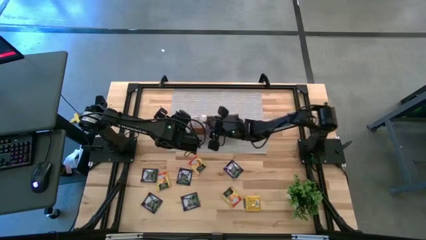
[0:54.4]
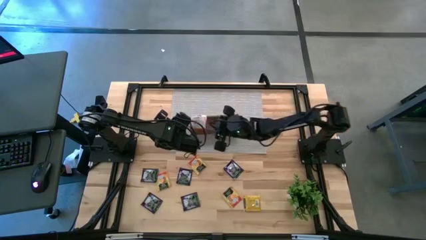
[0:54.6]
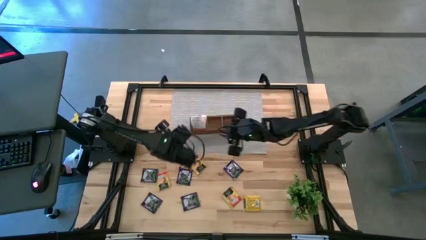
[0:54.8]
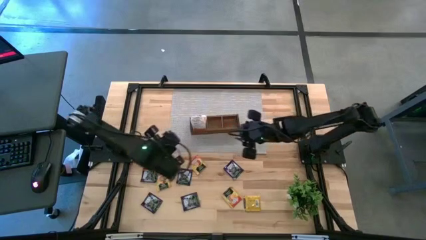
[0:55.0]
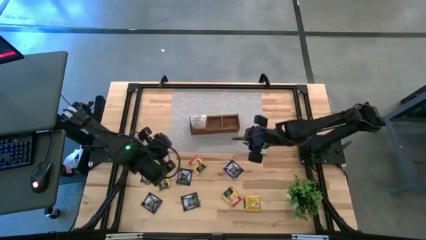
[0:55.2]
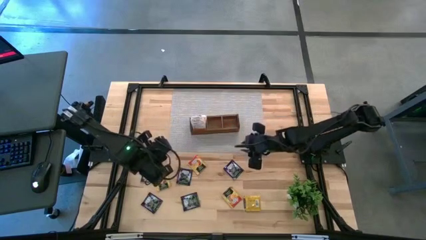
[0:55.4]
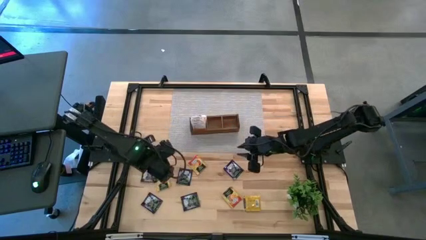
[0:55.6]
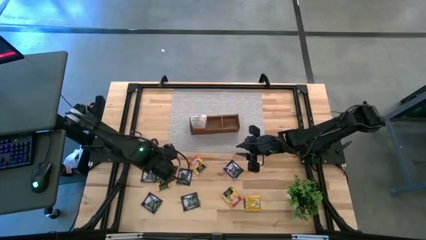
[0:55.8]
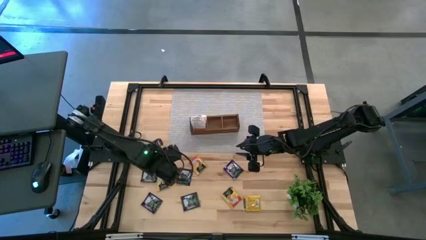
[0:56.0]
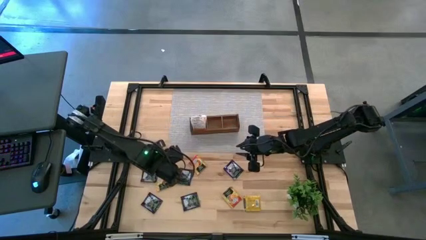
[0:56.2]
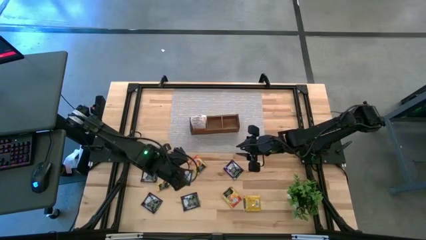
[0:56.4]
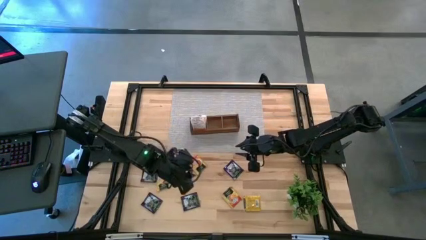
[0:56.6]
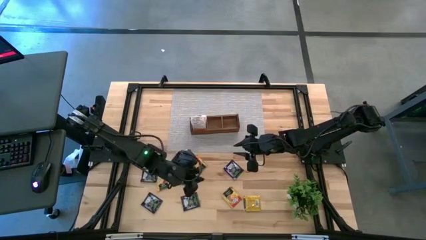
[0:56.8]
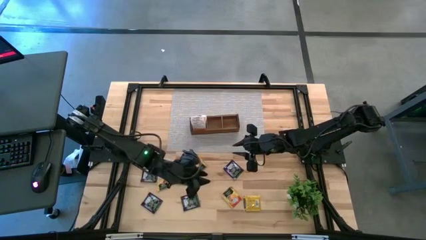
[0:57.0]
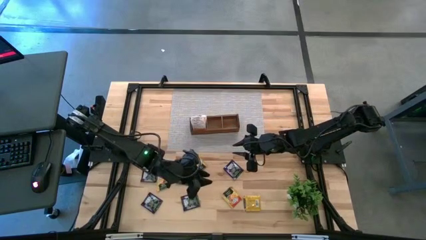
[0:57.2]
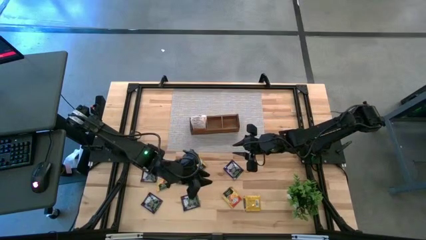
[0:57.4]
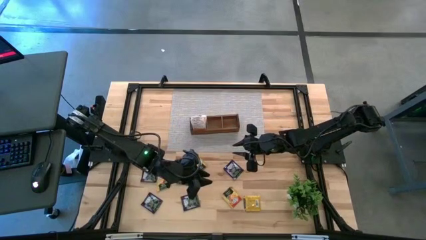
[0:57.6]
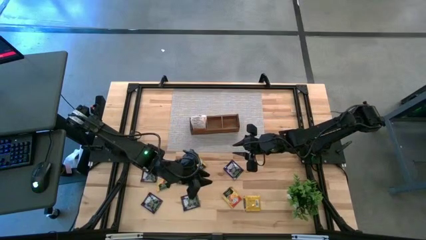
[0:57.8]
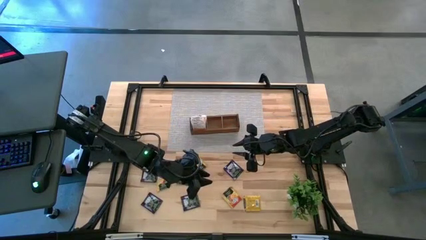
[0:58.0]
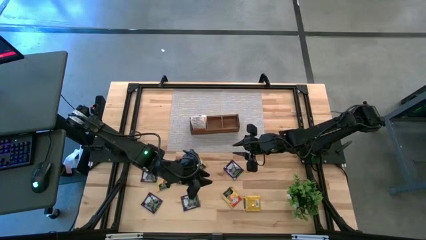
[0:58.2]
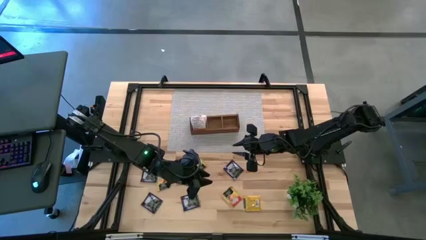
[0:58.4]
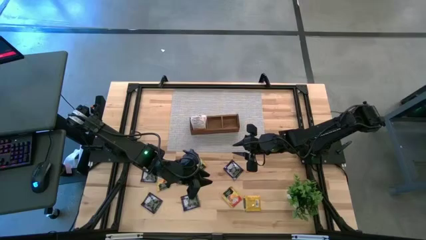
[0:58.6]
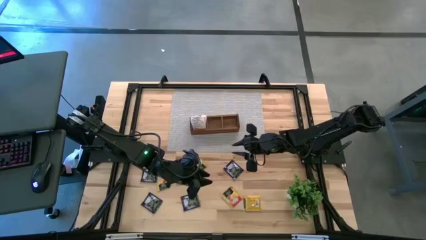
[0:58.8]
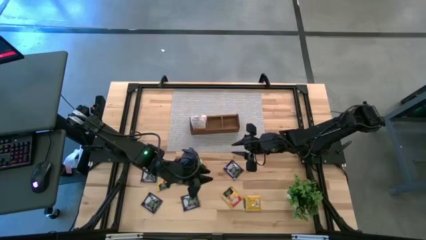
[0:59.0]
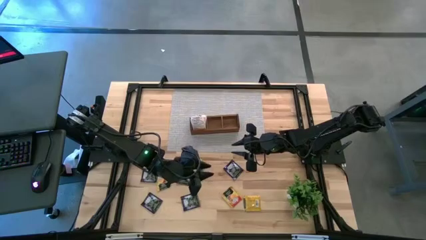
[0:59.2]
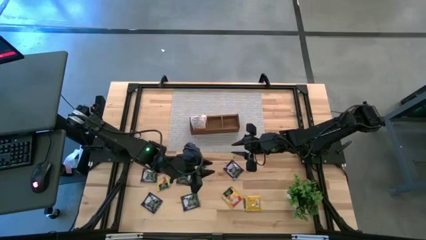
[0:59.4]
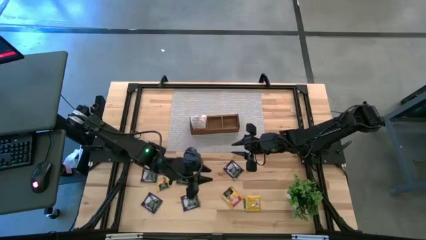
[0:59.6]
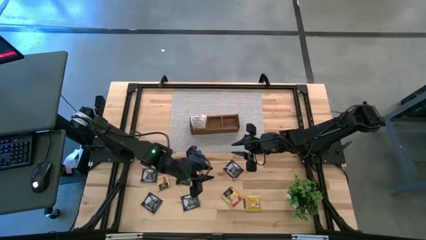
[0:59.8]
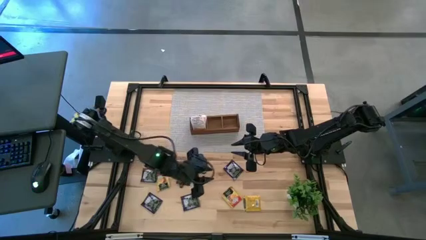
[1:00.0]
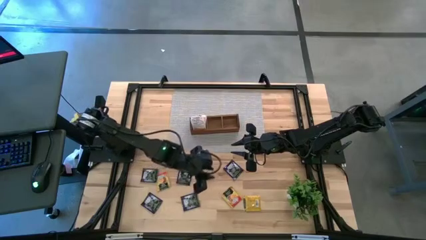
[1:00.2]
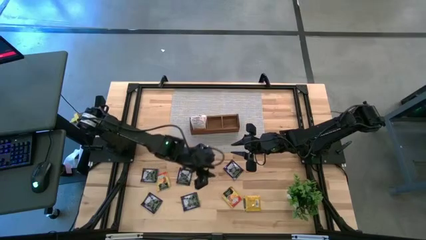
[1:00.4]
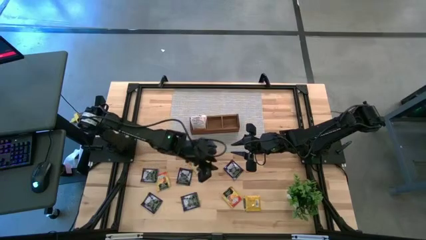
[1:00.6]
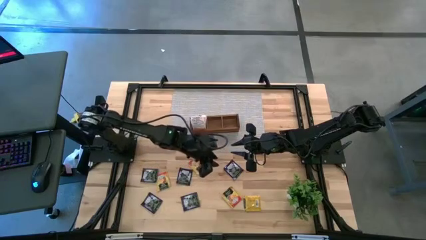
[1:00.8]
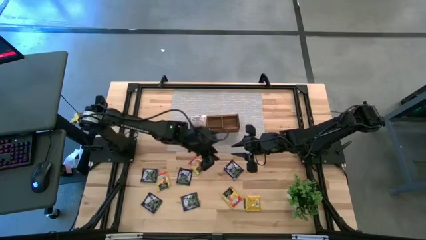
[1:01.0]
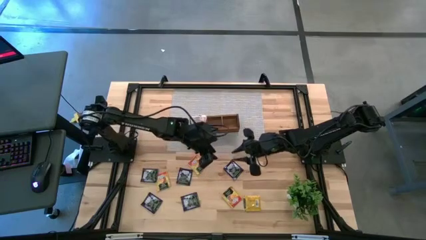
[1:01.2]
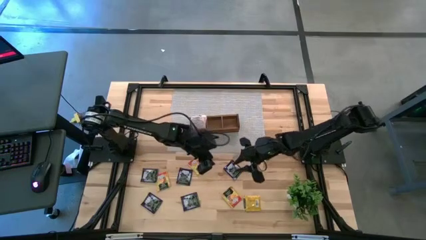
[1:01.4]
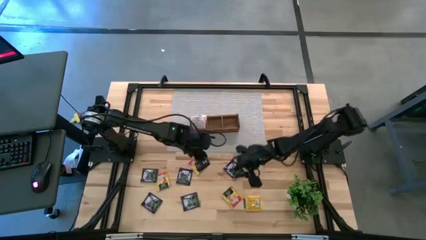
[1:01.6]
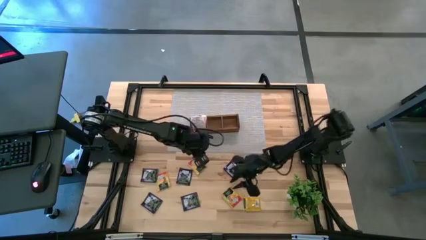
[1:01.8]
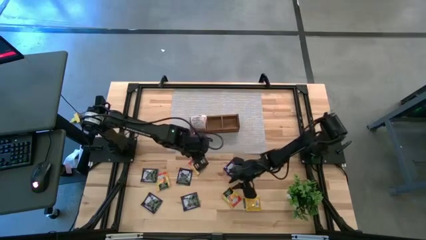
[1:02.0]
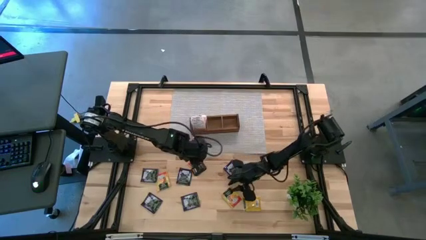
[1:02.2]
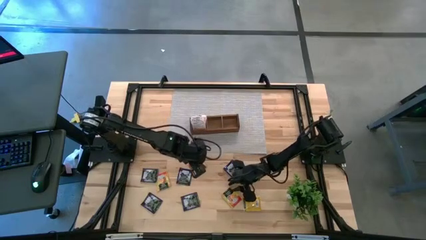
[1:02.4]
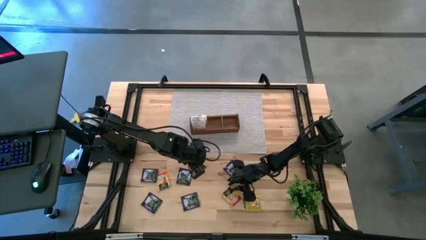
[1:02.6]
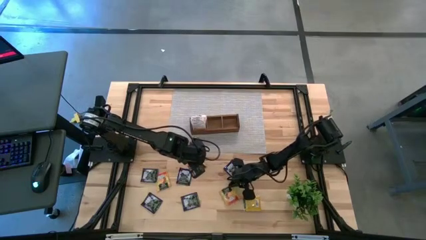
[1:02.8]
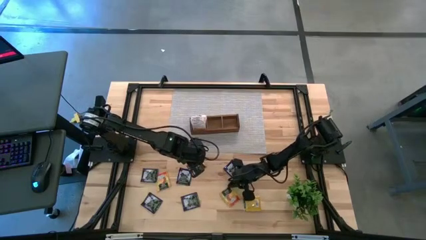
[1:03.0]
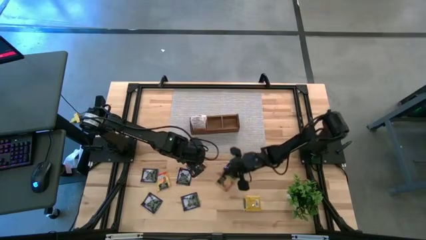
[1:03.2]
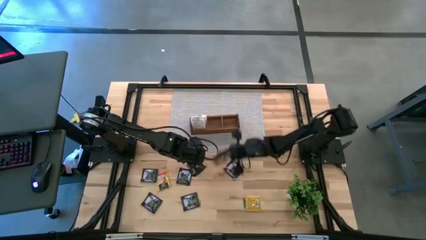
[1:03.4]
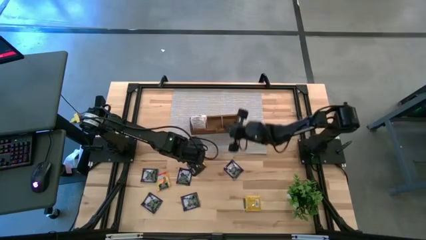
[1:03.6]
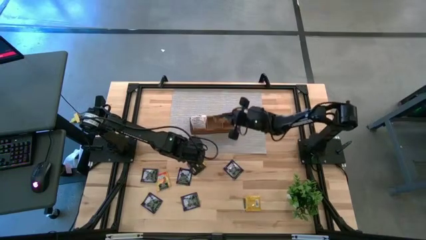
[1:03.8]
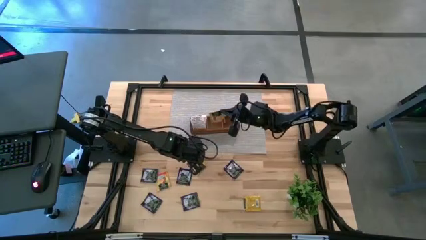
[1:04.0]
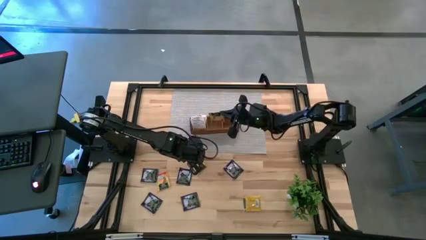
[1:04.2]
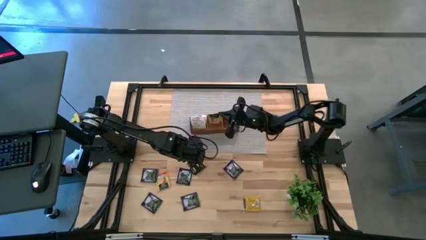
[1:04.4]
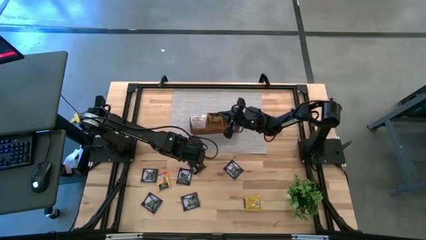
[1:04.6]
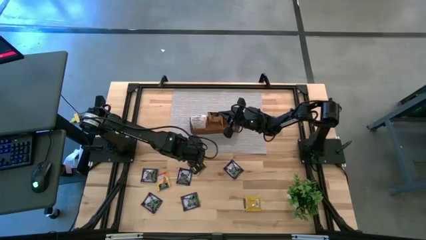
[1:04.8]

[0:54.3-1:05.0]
Task: Pick & Place Tea
Put the yellow tea bag into the middle section of the wooden organizer

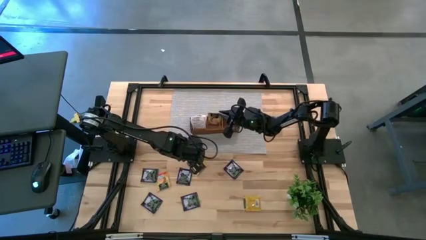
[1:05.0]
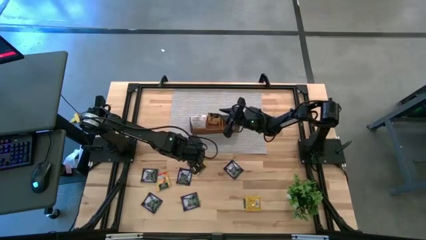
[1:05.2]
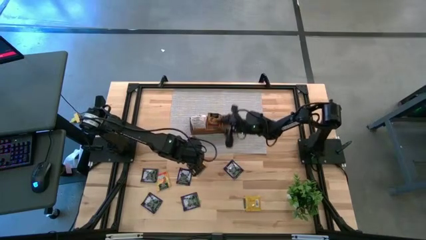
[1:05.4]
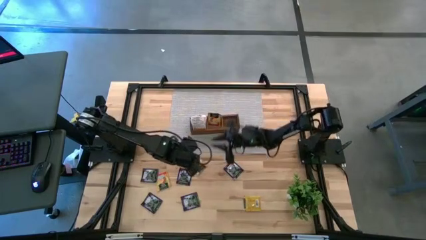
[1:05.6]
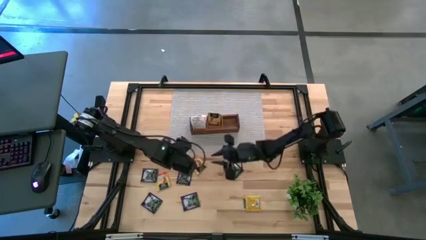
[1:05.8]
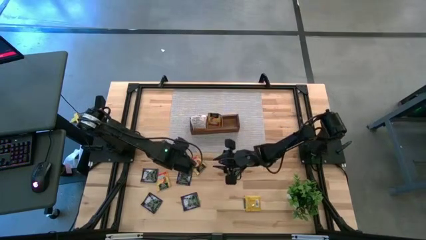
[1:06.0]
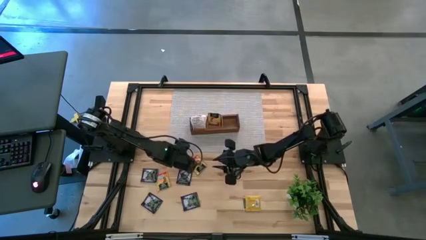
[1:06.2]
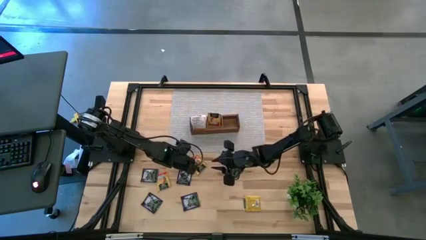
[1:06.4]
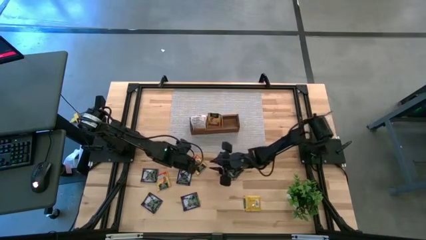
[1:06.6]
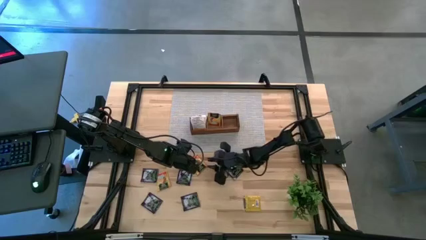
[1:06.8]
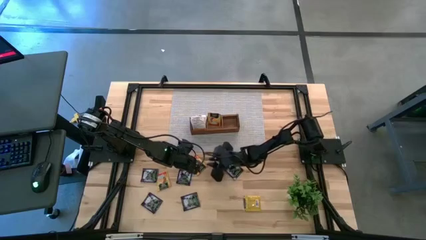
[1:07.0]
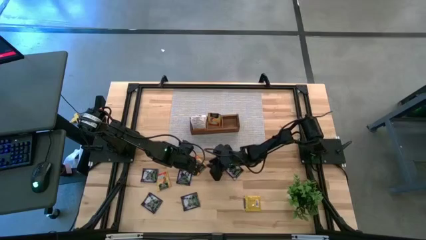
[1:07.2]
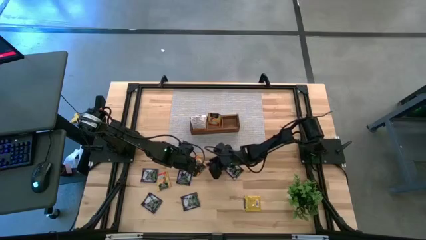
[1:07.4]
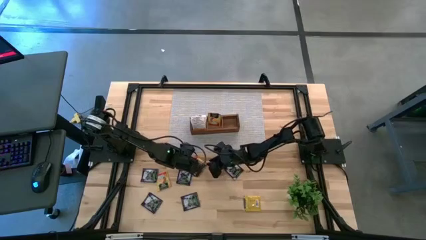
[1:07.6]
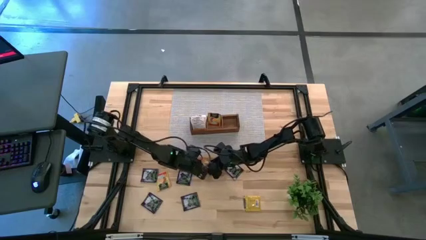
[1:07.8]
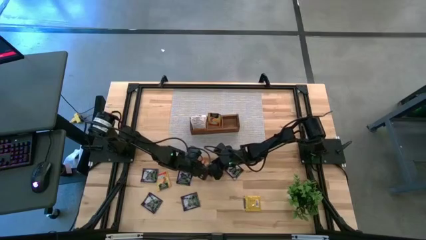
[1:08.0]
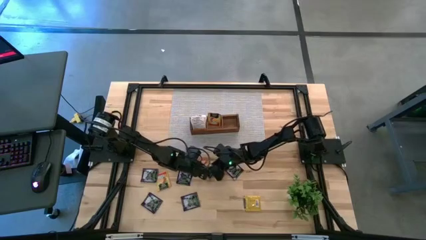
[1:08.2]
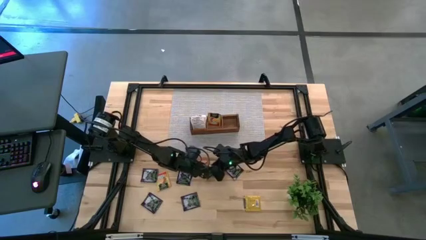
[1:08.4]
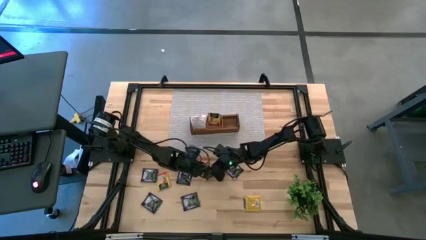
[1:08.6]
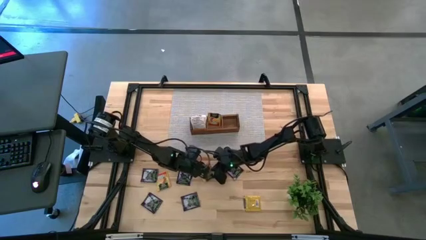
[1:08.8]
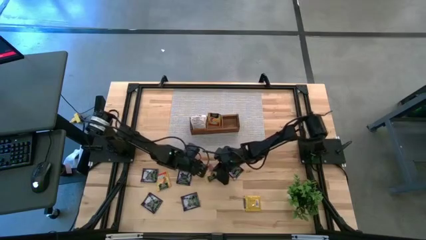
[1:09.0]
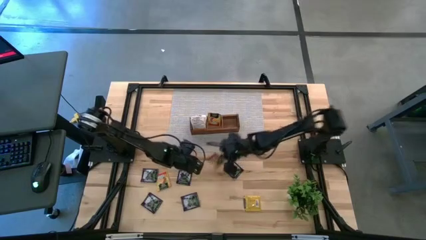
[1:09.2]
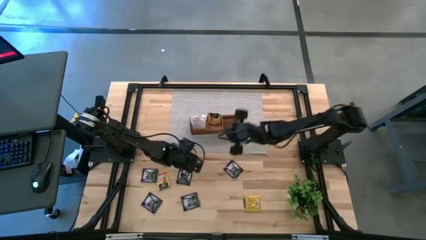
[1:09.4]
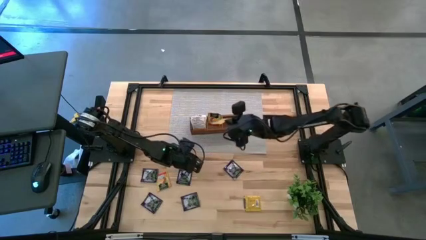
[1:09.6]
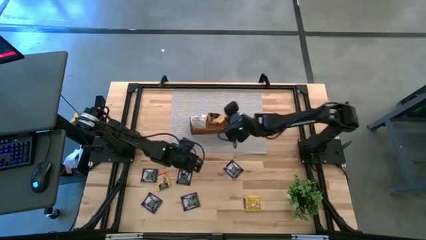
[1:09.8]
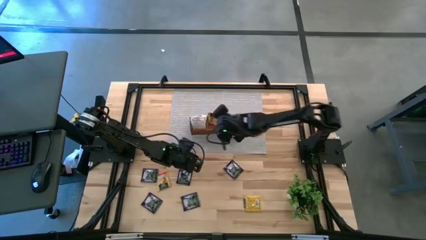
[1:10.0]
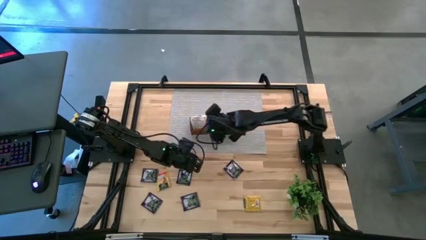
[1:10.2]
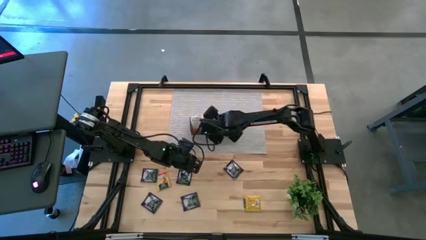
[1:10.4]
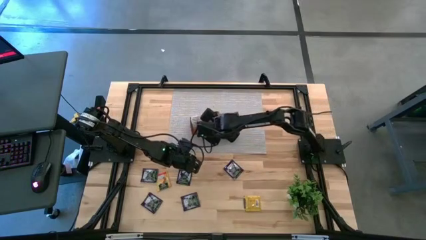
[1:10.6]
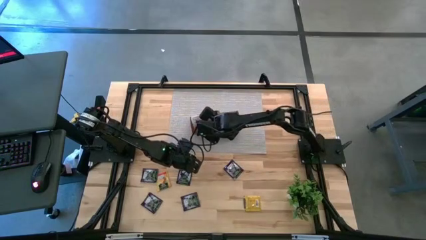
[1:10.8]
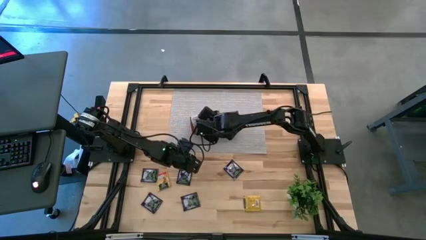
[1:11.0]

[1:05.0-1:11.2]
Put the yellow tea bag into the middle section of the wooden organizer
